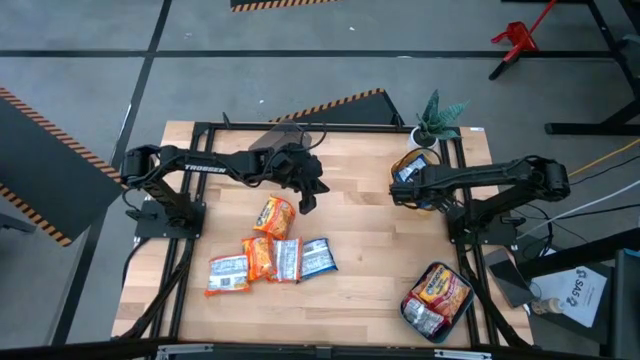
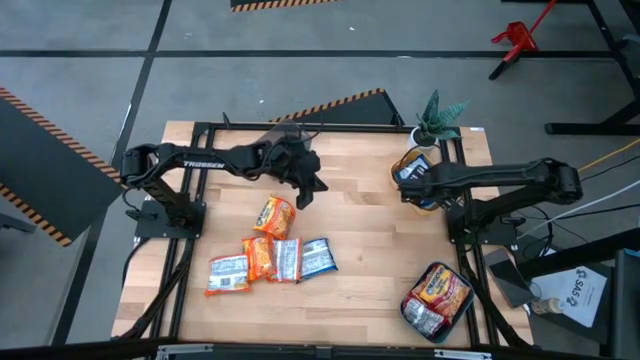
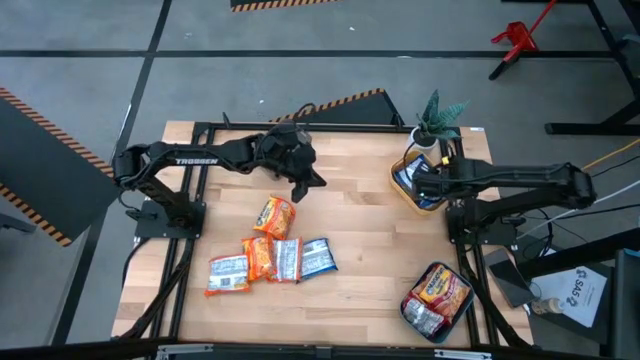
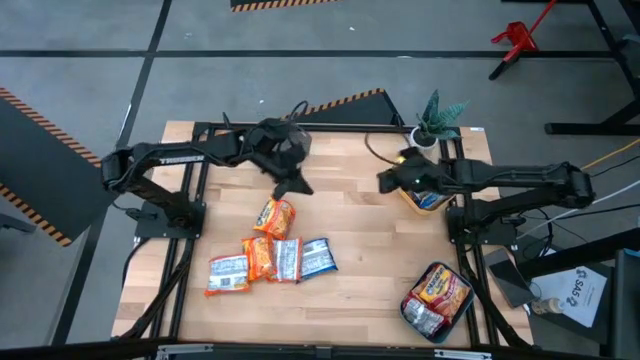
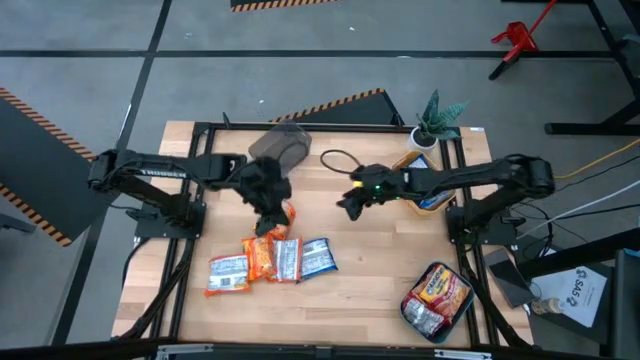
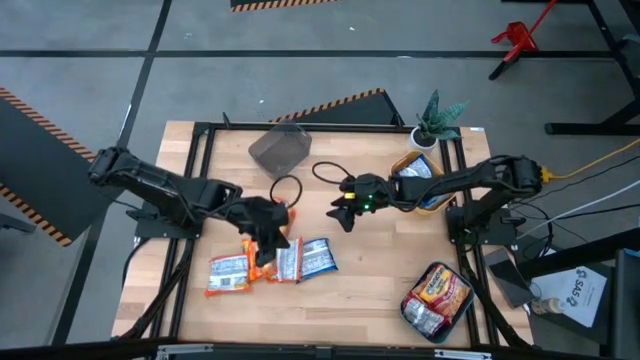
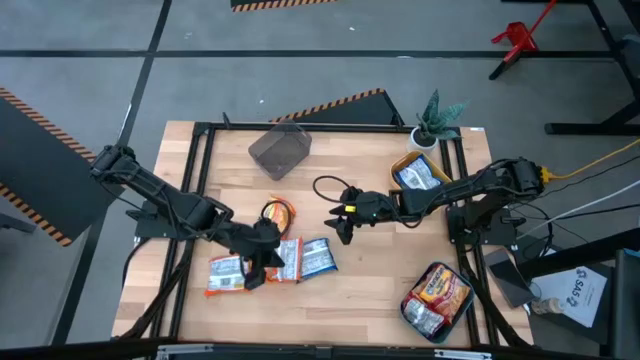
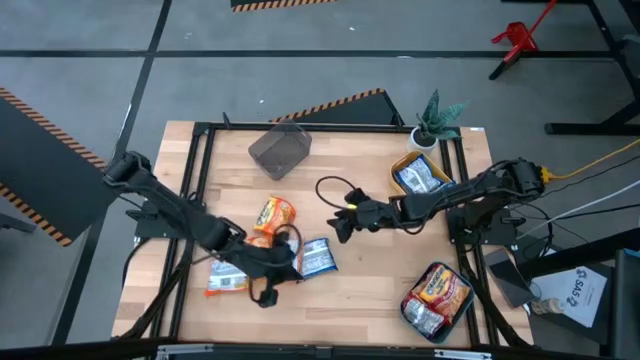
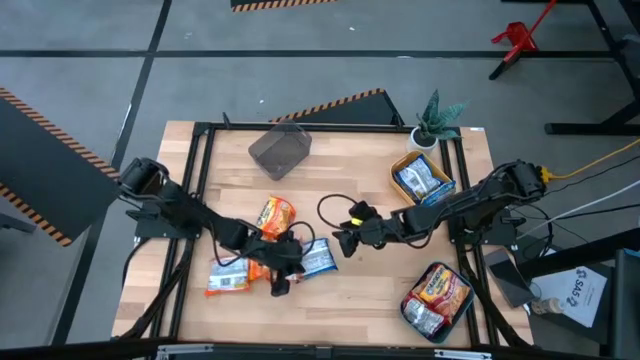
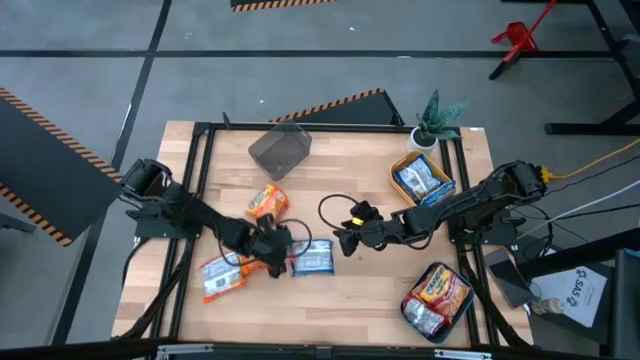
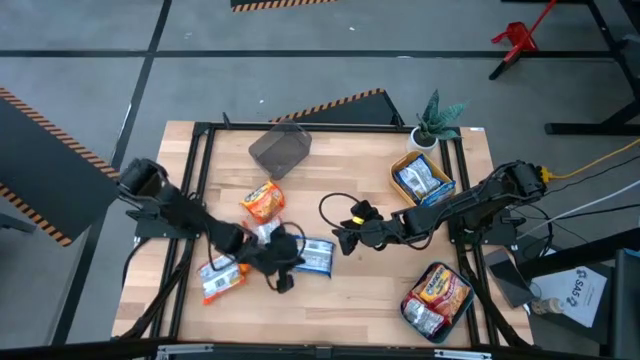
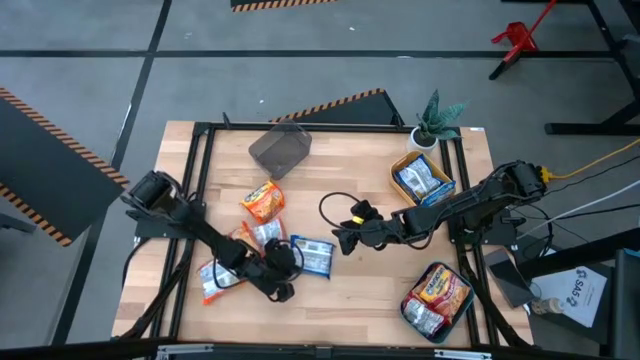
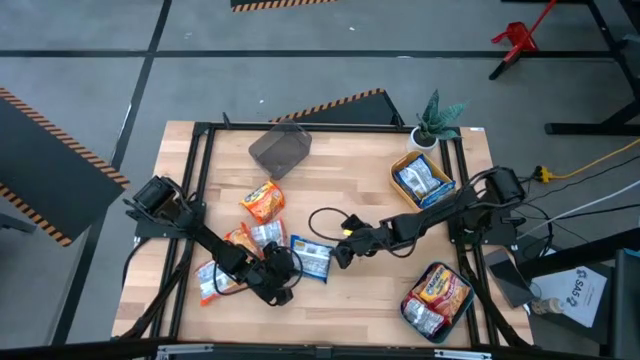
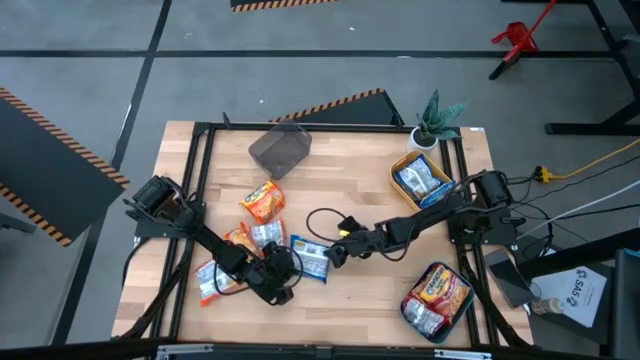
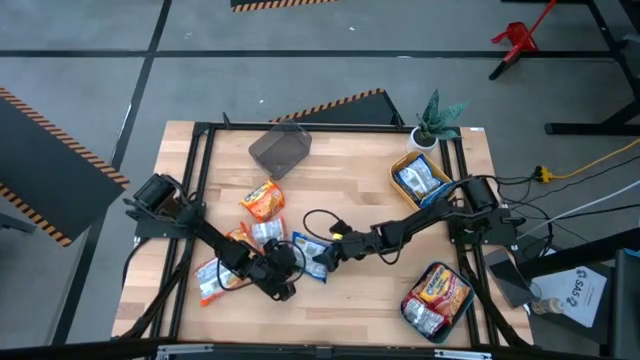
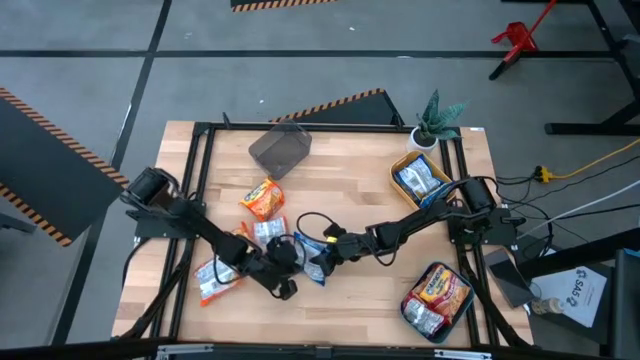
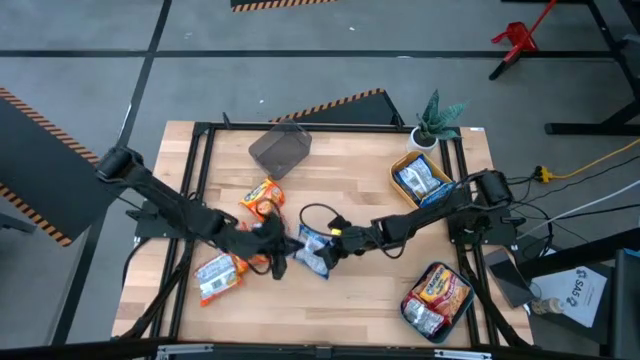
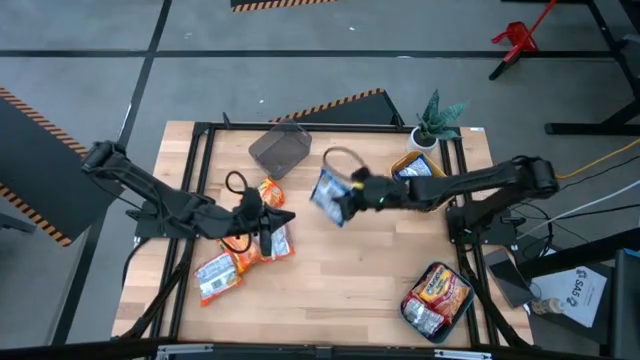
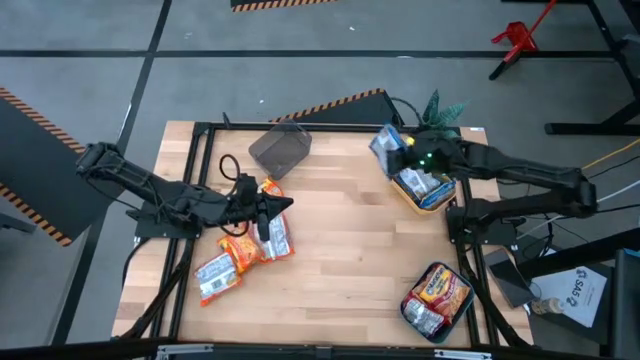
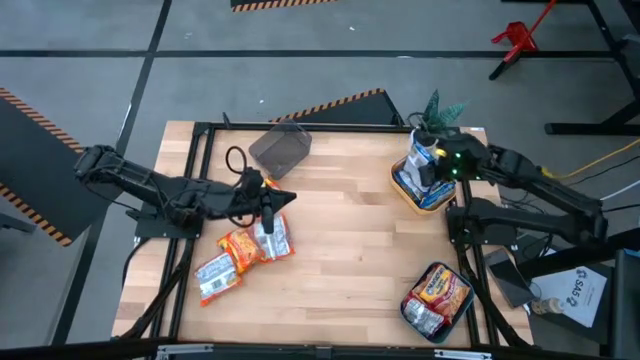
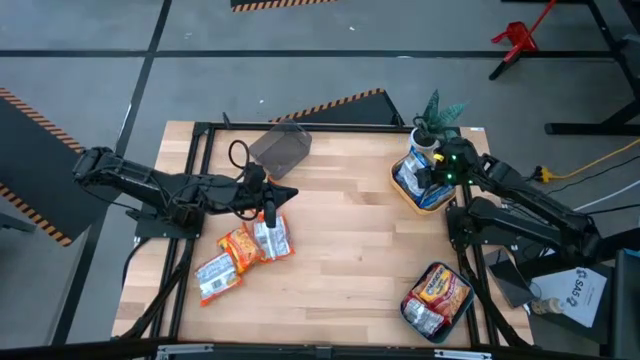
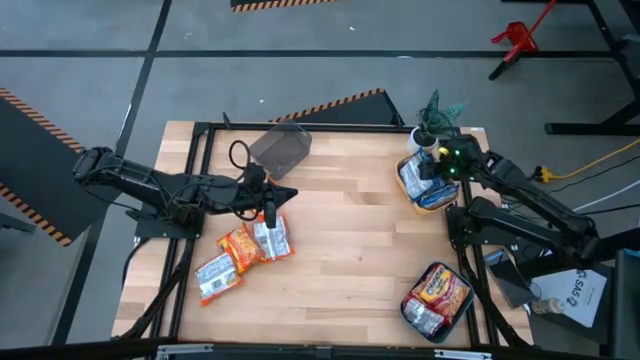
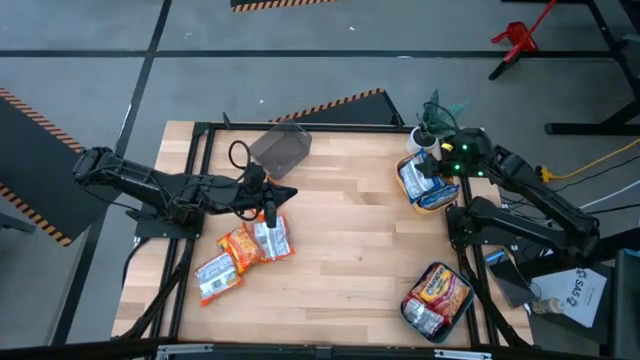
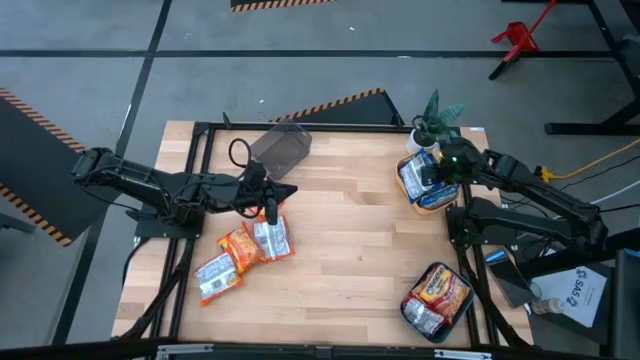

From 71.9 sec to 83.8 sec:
Task: Sort Maruchan noodles
Put the blue noodle pack into the yellow bin

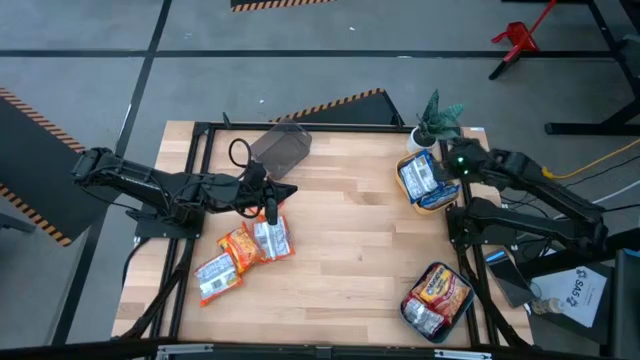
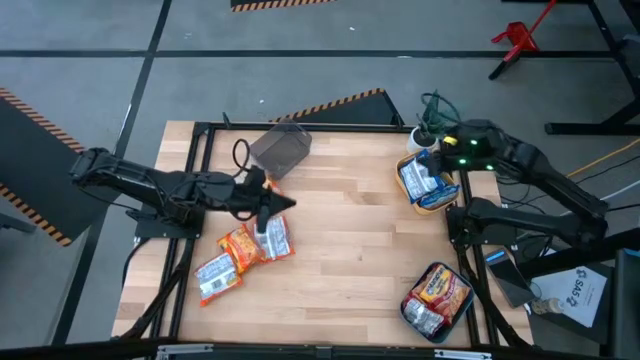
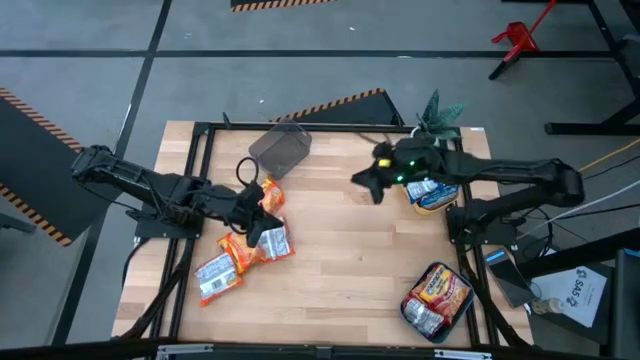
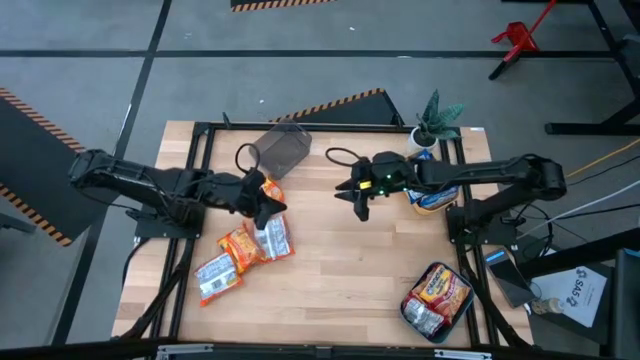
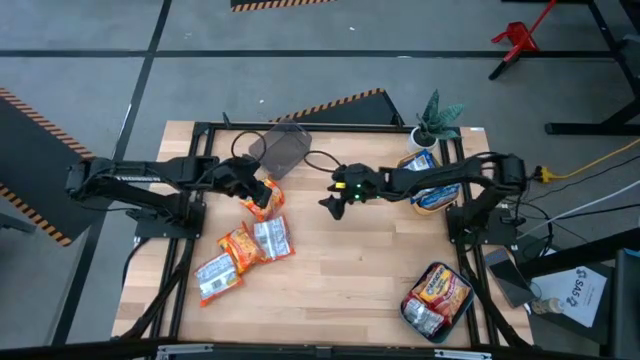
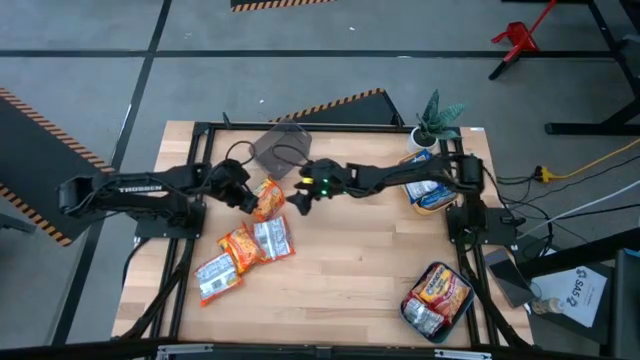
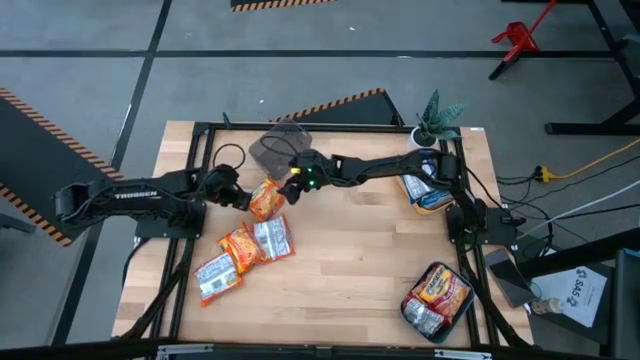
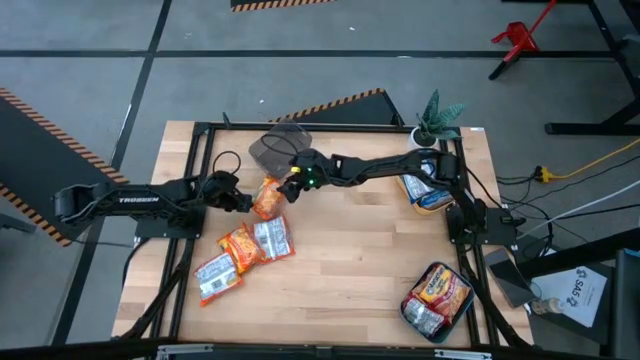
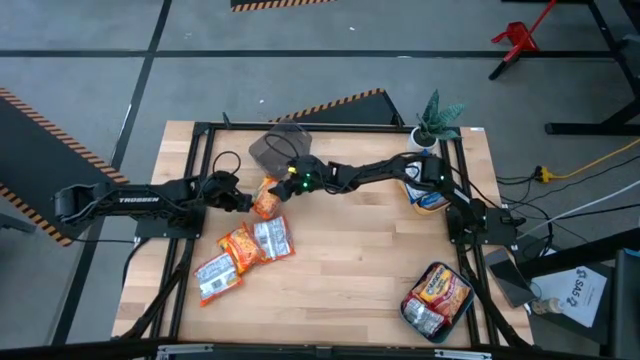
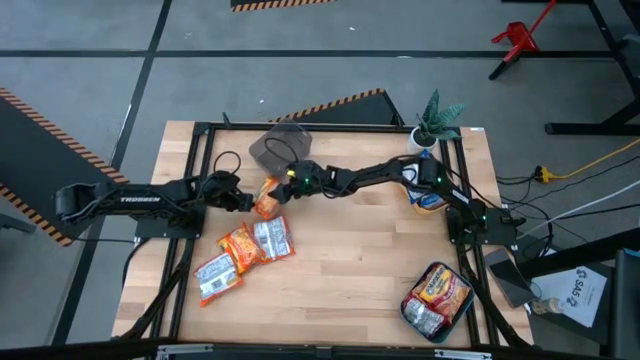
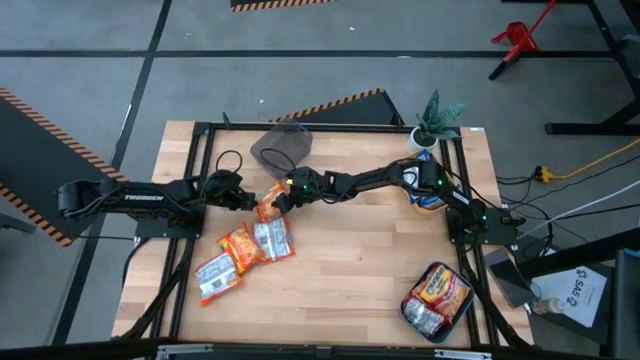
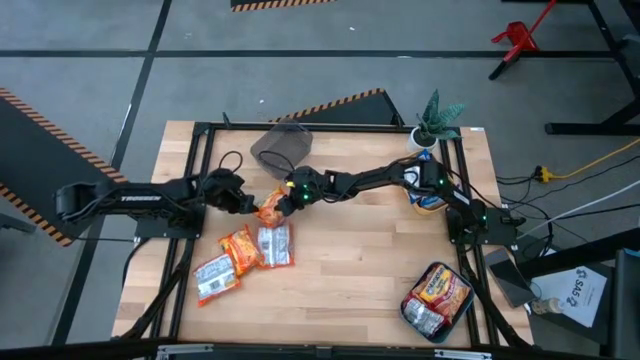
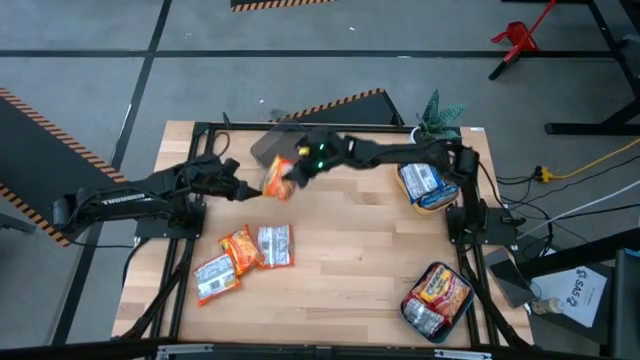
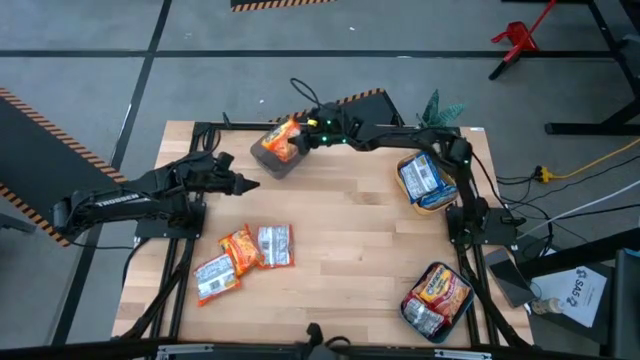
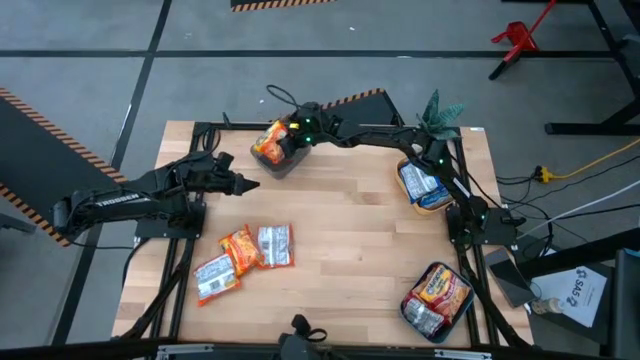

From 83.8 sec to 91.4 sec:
Put the orange noodle pack into the gray bin

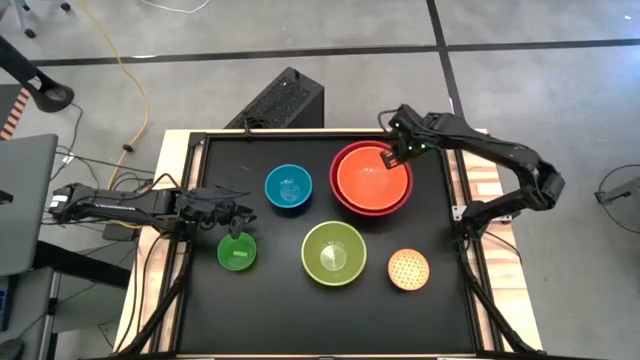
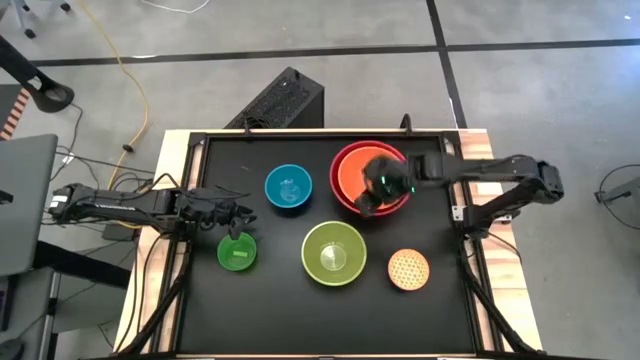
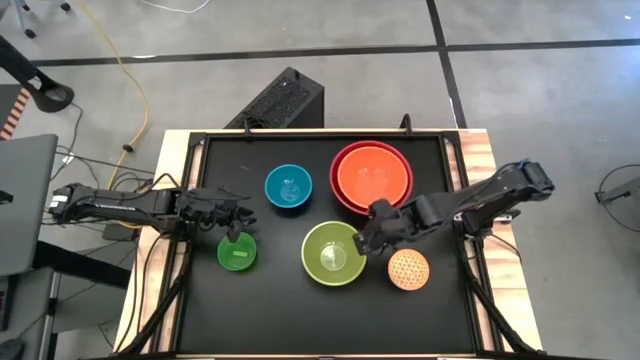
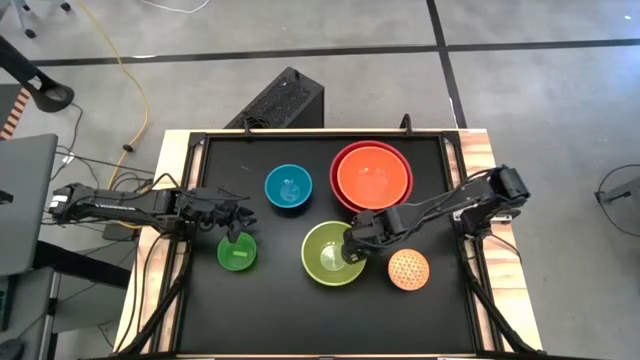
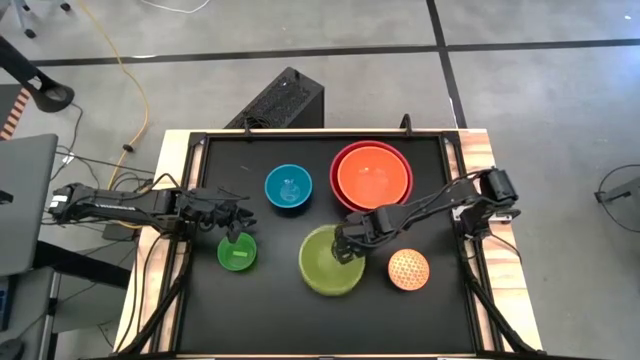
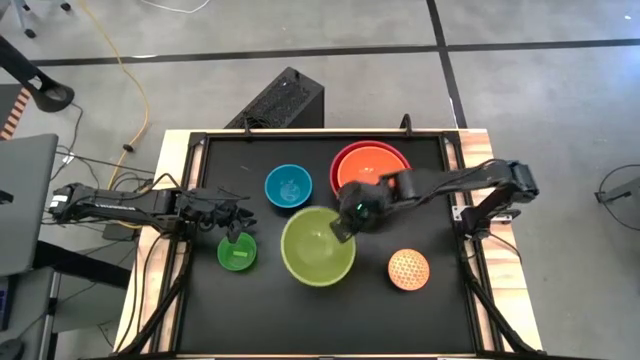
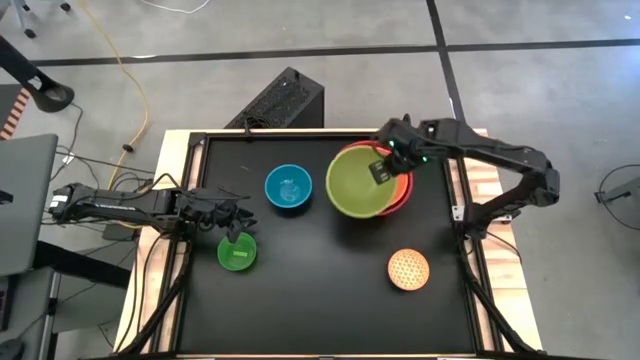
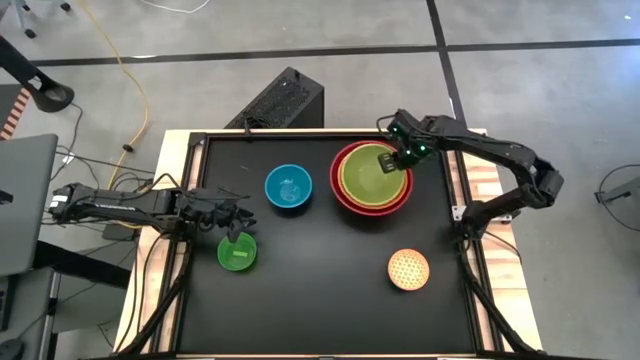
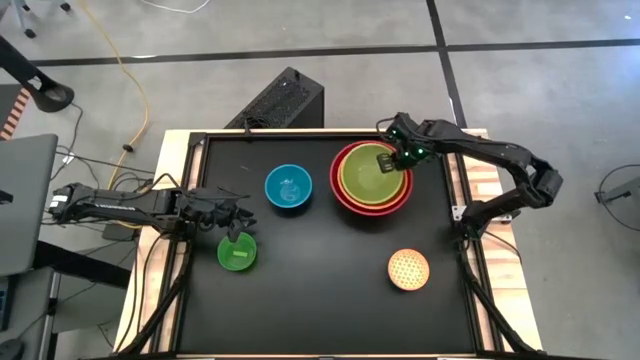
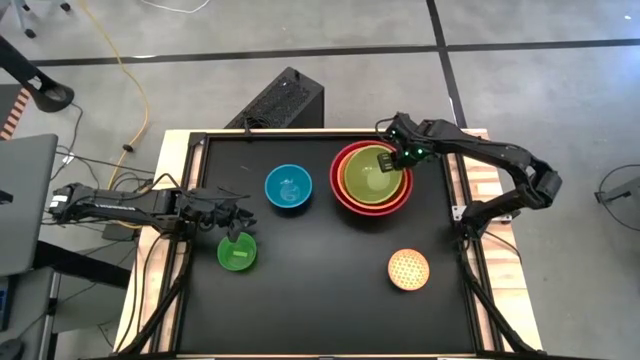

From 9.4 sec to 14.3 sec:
Task: Nest bowls inside each other by size order
Stack the green bowl on top of the orange bowl
